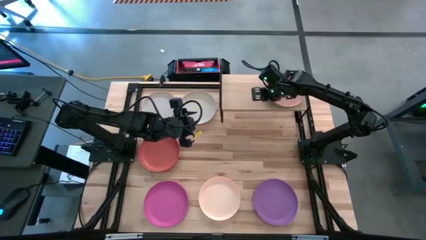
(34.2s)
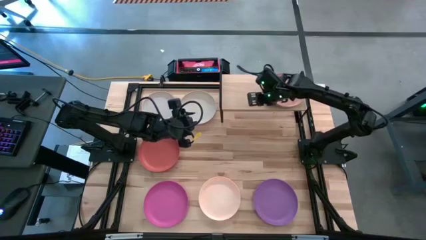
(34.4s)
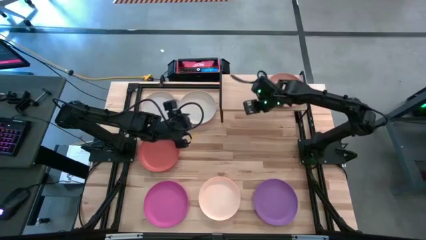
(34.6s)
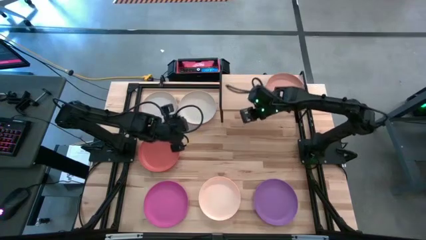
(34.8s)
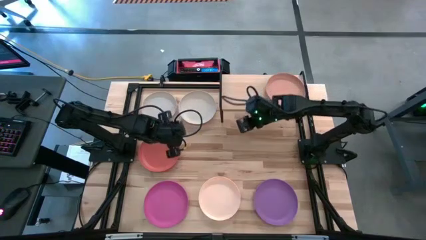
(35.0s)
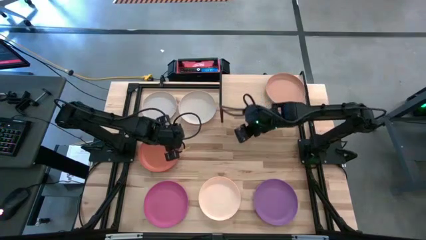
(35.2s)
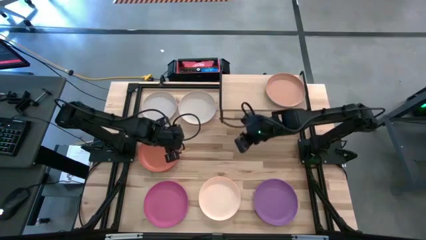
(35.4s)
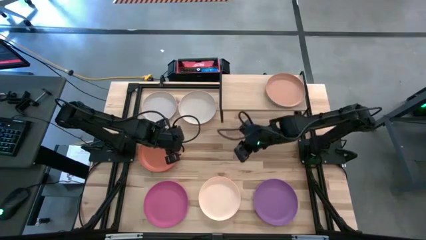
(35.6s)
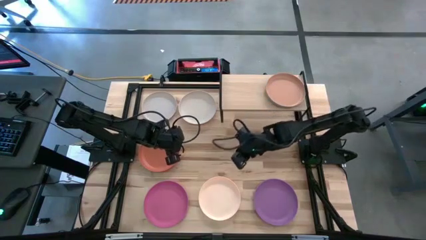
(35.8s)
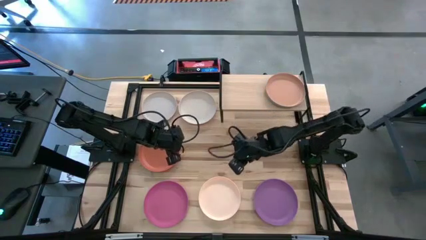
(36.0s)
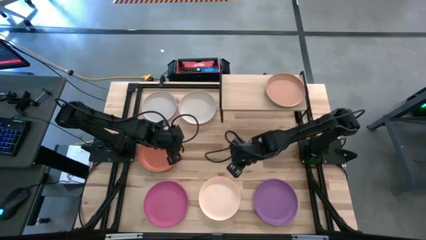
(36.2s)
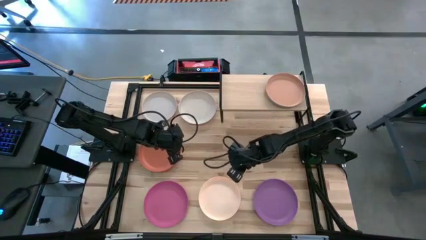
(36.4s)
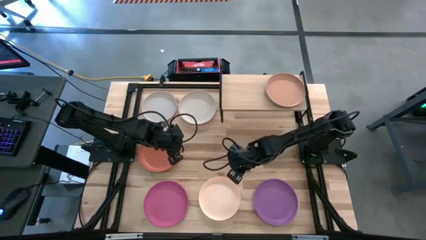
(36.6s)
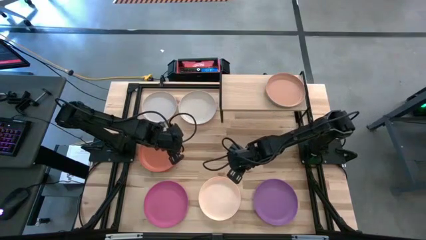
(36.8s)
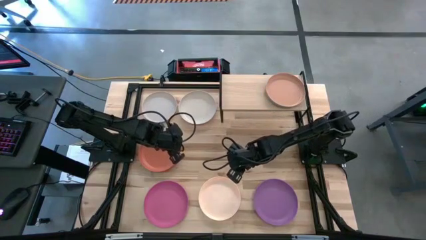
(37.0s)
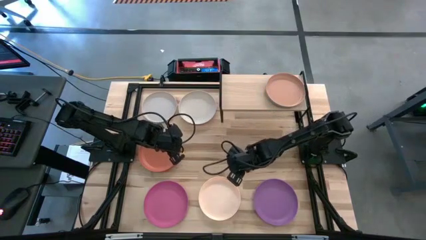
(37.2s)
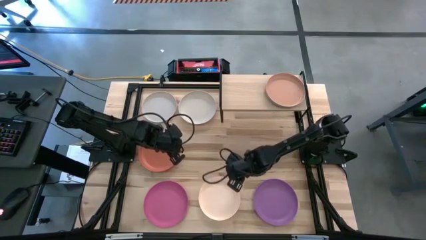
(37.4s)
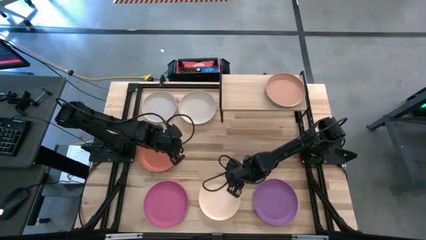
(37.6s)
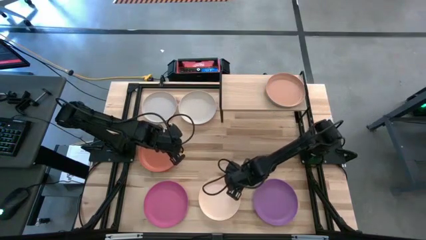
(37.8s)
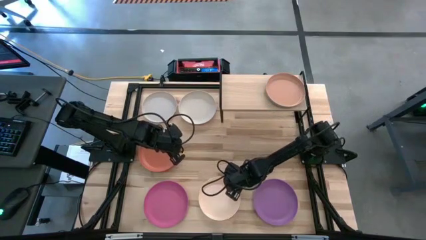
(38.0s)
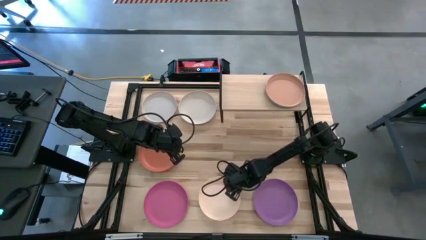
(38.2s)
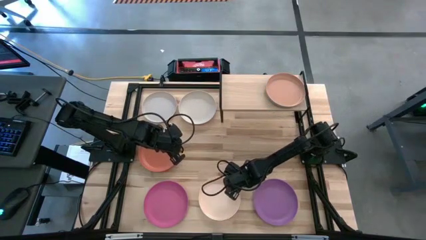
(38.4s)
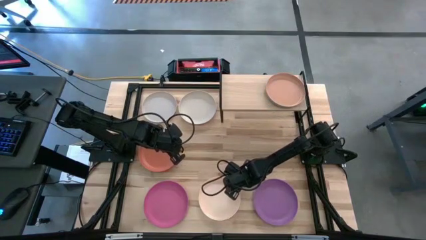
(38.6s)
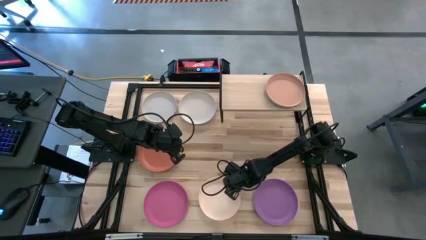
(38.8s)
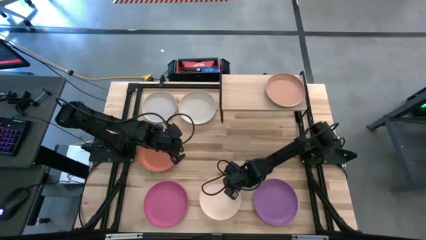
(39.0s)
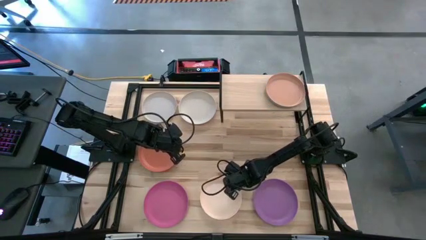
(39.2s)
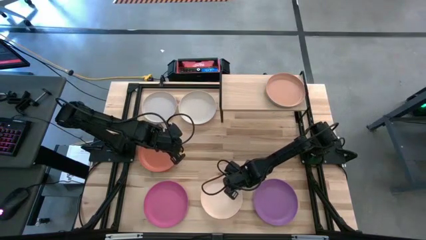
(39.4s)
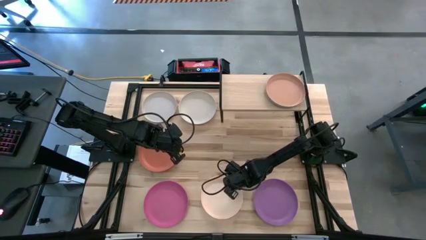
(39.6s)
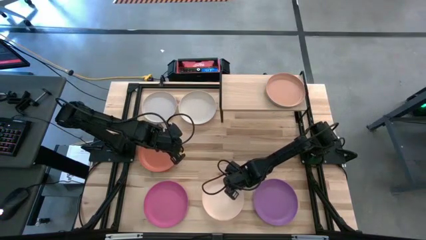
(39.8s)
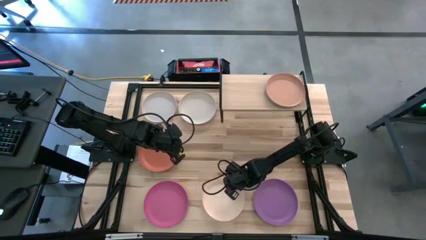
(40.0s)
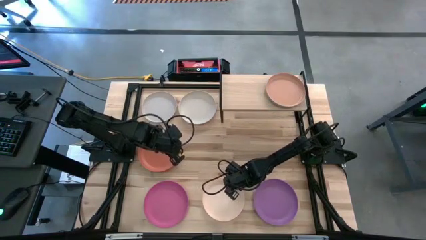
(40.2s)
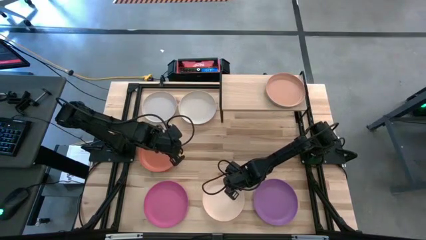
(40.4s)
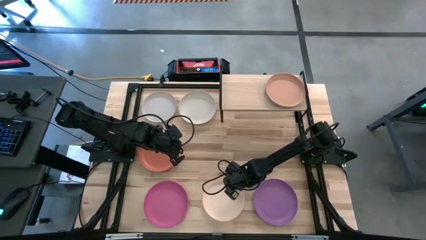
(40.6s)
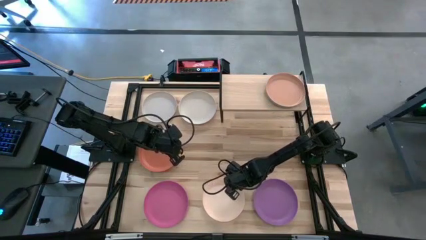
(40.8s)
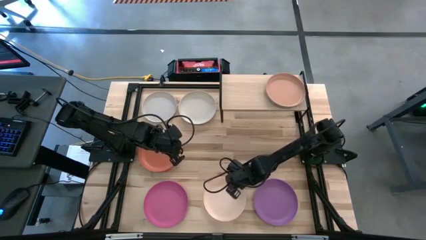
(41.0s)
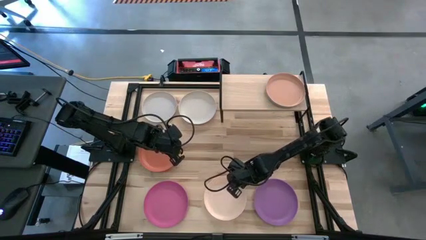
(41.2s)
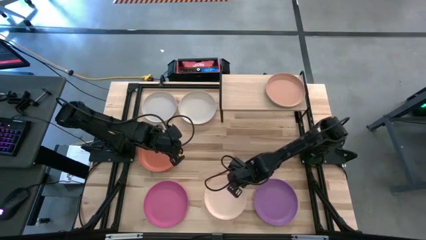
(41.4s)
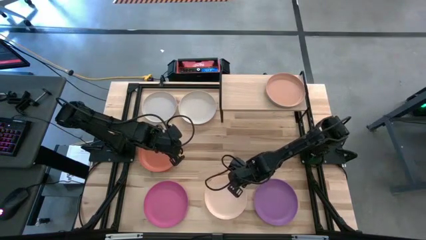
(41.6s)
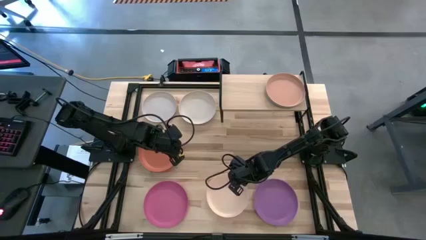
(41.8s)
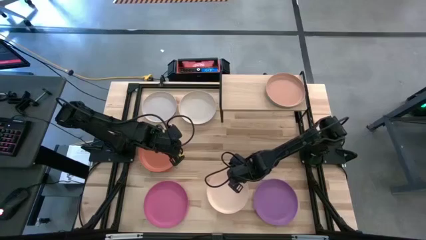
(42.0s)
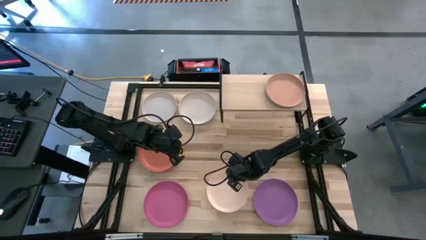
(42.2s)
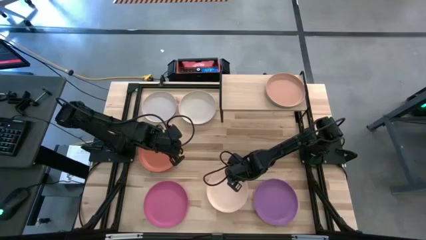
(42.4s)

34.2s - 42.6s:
Task: Place and stack plates onto a shelf
Stack the light orange plate on top of the brown plate on the shelf

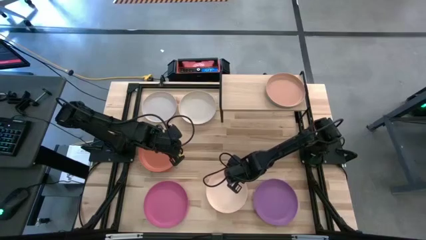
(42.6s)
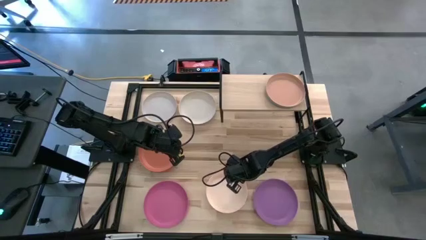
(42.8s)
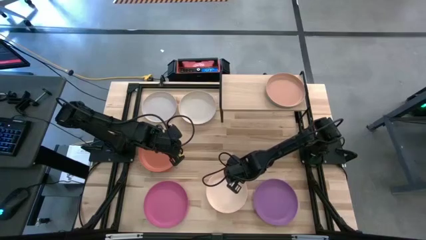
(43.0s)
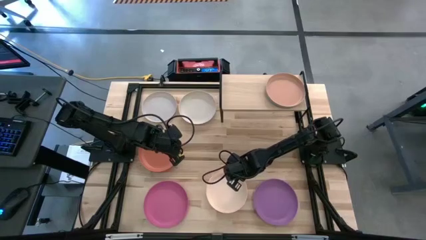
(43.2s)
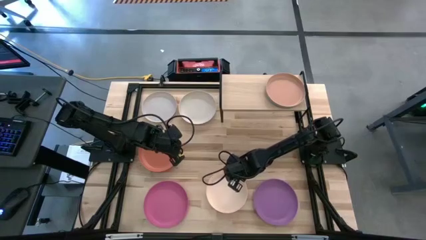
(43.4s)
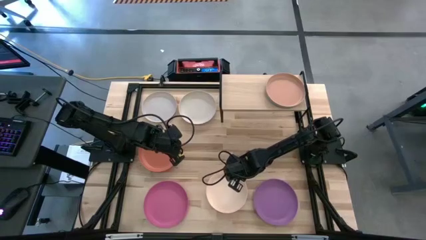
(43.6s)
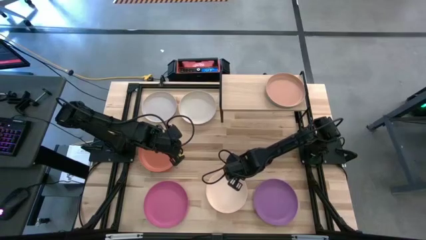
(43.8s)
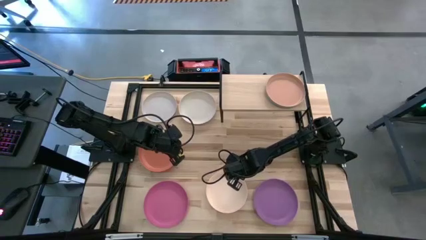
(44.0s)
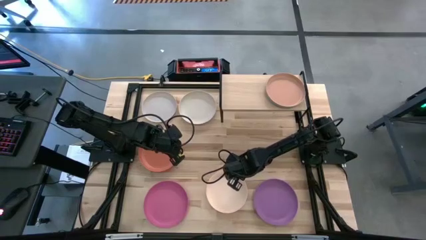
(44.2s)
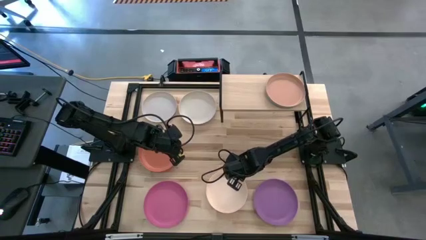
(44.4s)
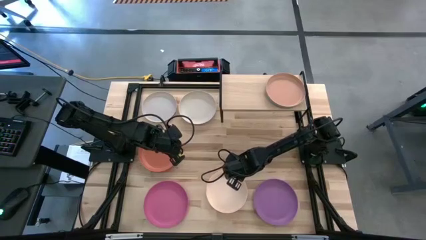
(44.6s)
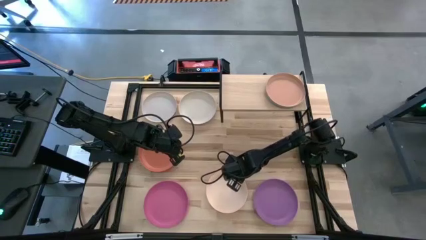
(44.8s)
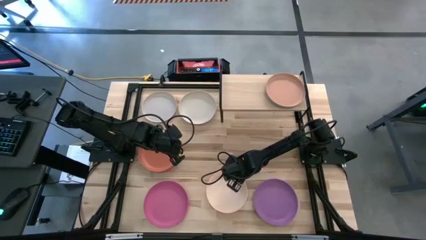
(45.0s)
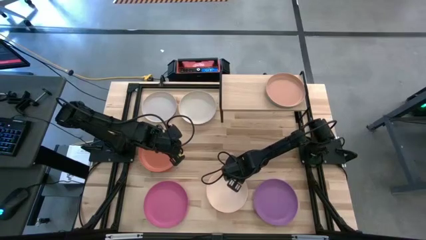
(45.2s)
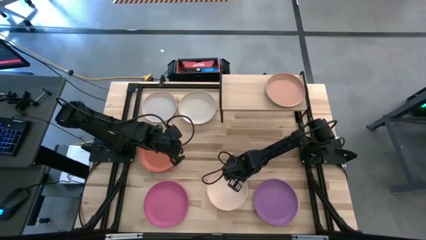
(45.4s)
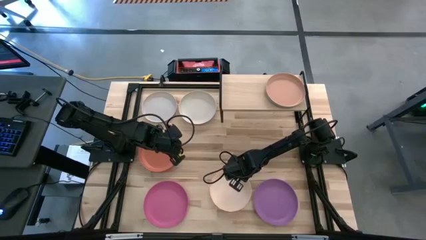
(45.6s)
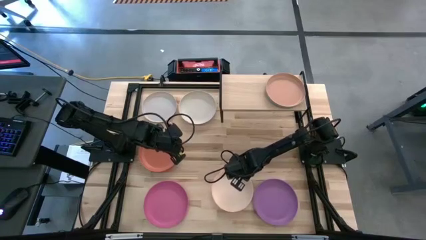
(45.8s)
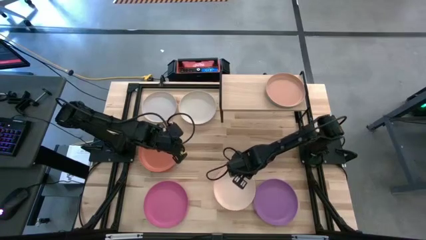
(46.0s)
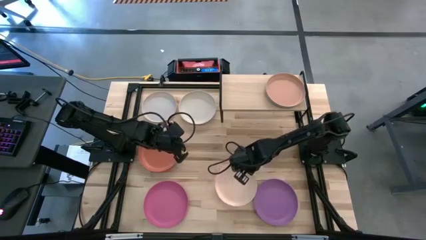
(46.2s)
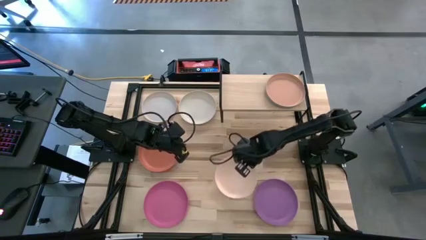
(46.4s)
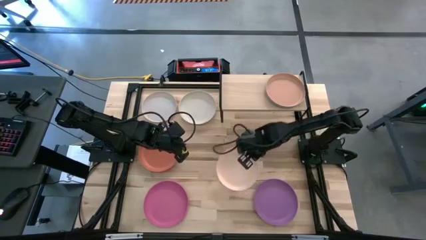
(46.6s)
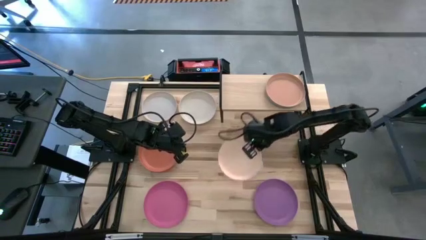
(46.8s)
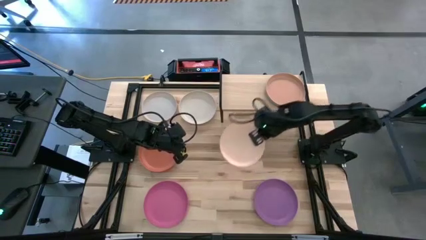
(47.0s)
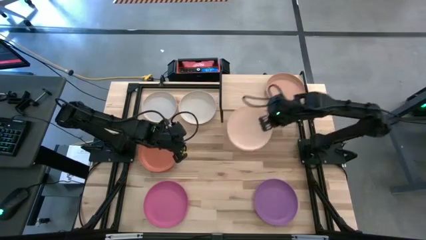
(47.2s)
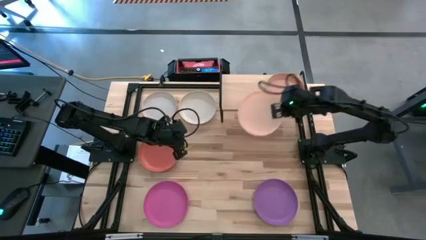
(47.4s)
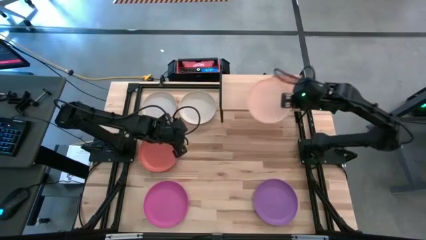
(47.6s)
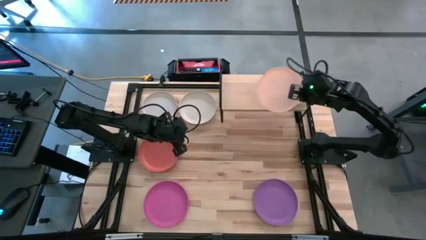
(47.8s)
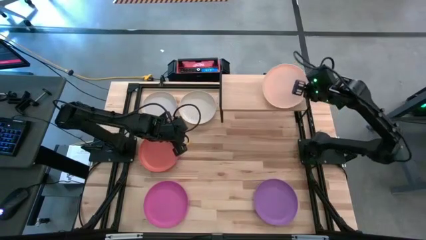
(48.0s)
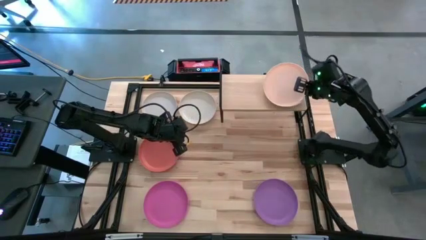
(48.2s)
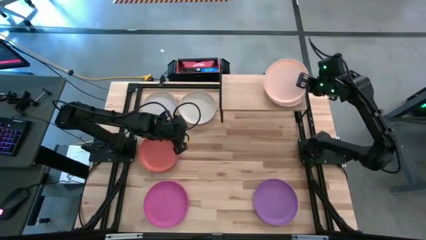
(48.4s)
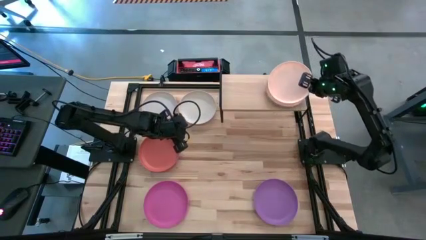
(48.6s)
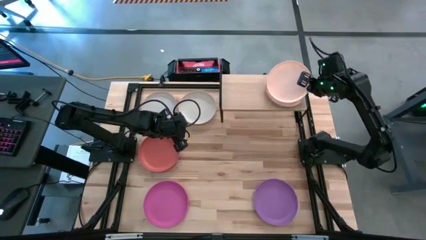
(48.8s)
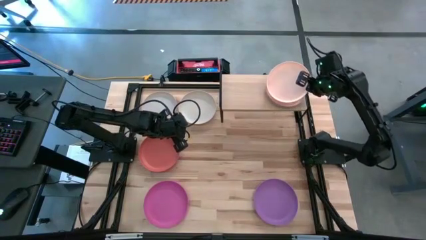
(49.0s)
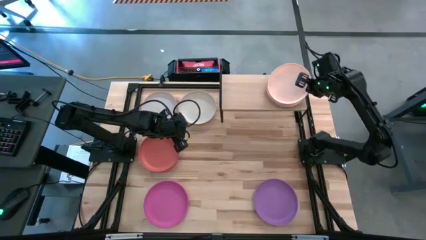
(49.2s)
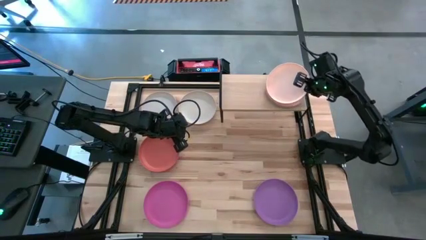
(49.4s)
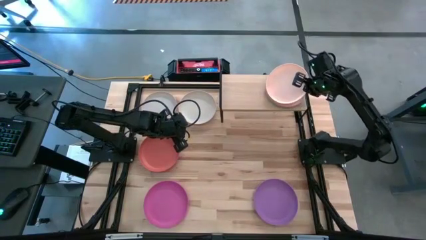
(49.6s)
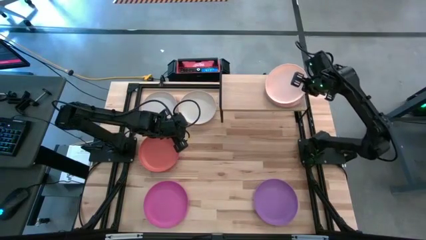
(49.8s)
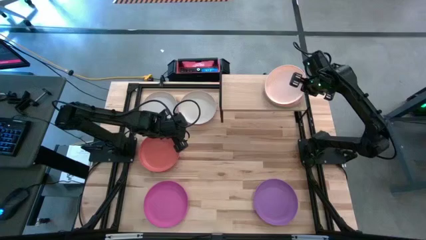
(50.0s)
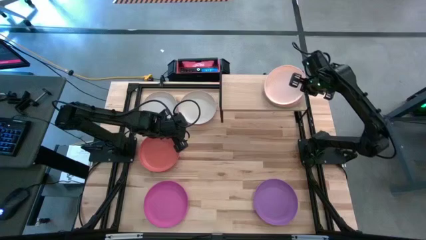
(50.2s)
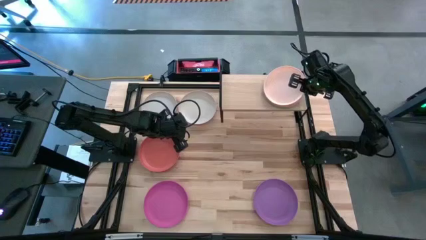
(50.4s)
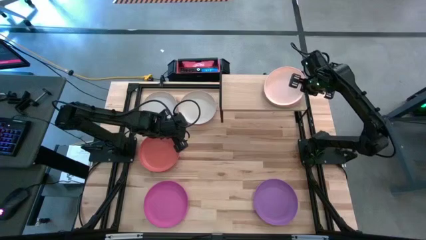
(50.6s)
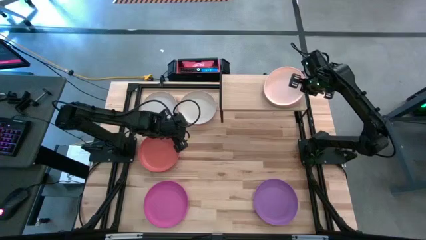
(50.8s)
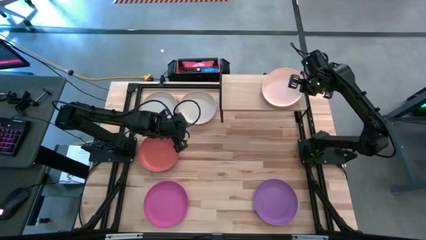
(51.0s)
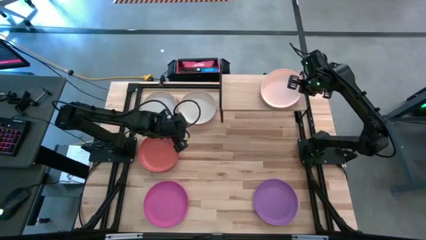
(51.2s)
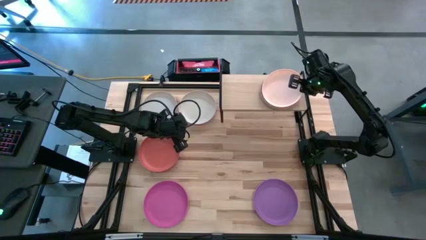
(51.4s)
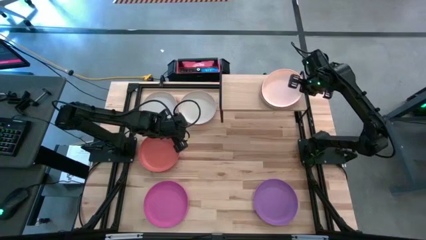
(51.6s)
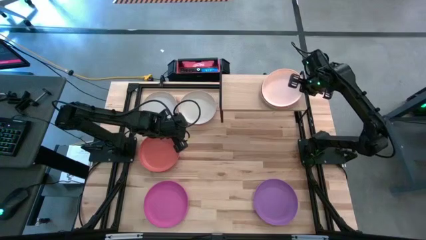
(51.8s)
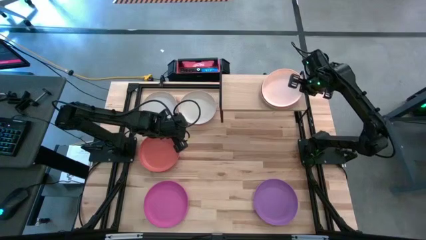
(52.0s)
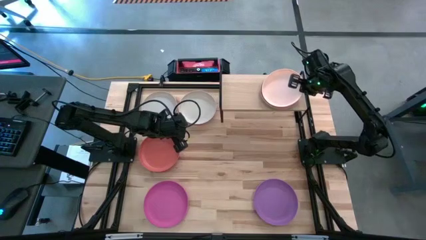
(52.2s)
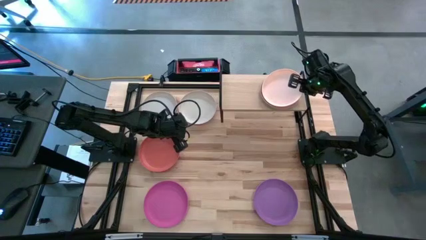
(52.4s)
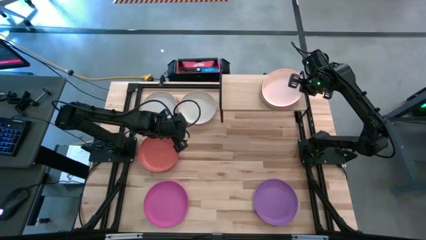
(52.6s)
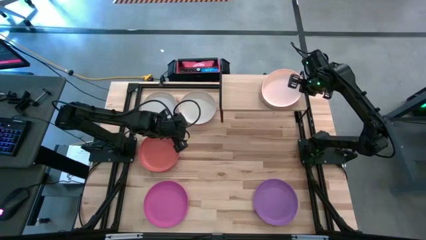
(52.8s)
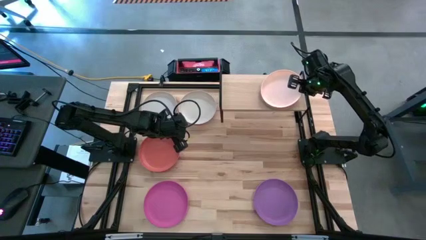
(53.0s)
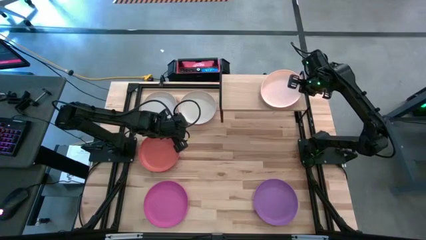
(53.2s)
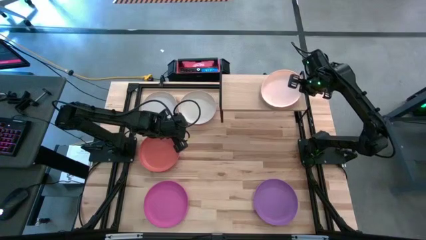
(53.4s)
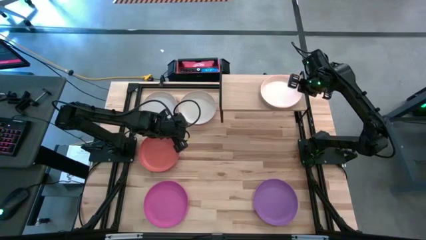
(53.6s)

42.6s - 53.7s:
Stack the light orange plate on top of the brown plate on the shelf
